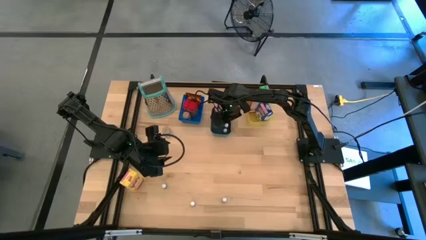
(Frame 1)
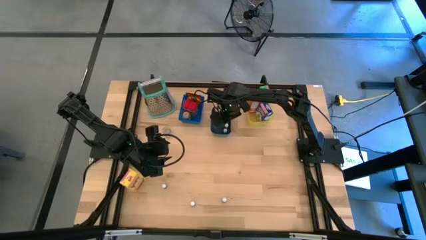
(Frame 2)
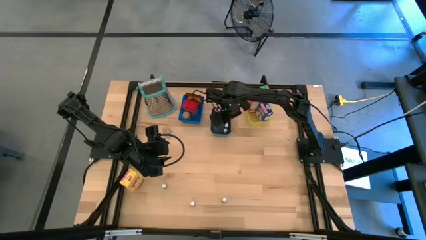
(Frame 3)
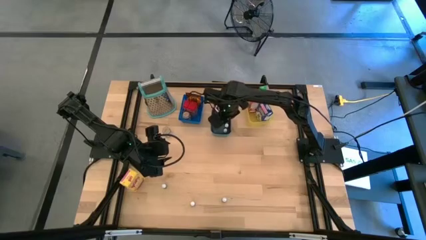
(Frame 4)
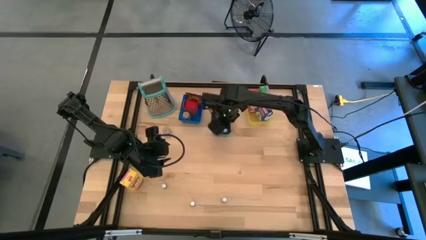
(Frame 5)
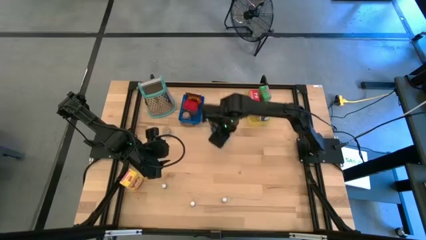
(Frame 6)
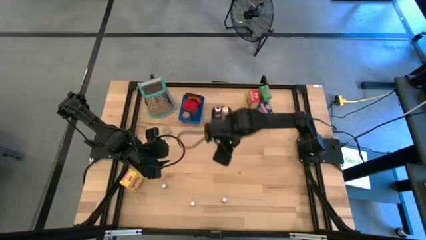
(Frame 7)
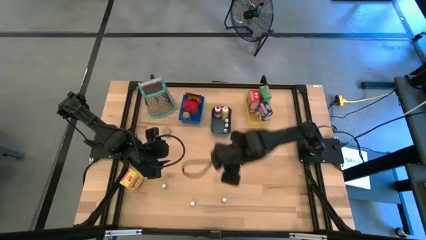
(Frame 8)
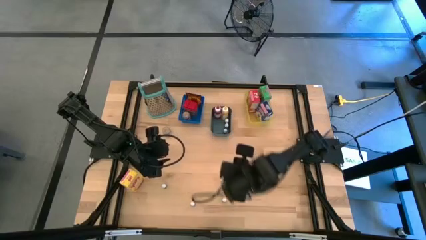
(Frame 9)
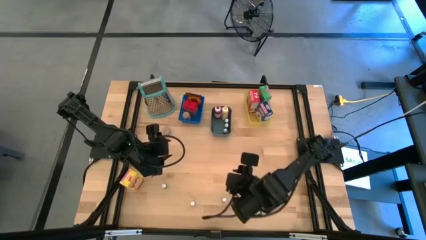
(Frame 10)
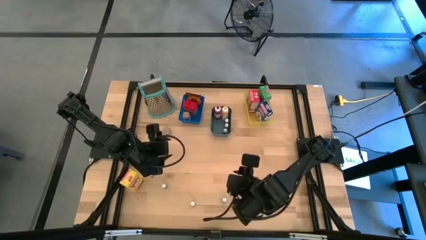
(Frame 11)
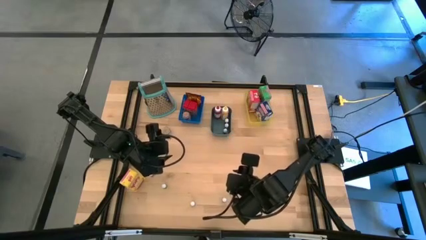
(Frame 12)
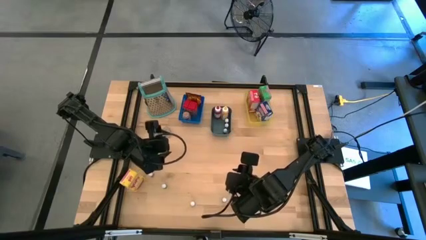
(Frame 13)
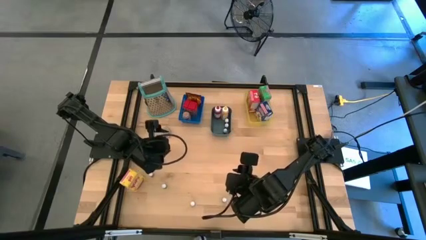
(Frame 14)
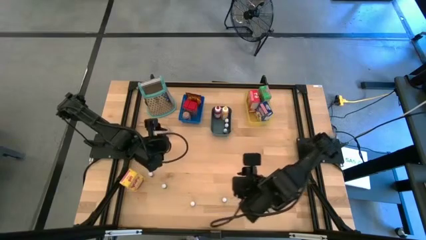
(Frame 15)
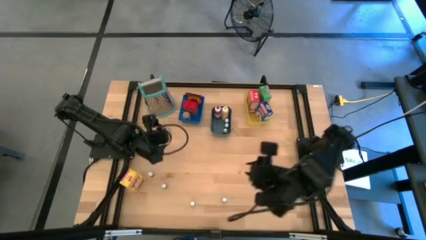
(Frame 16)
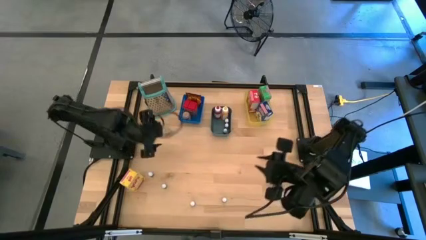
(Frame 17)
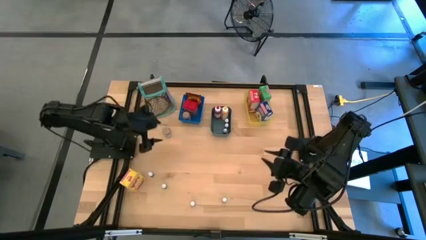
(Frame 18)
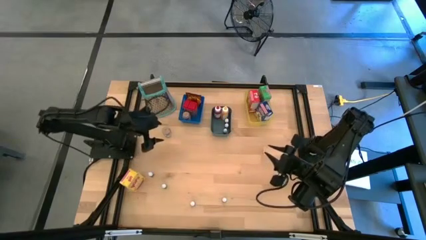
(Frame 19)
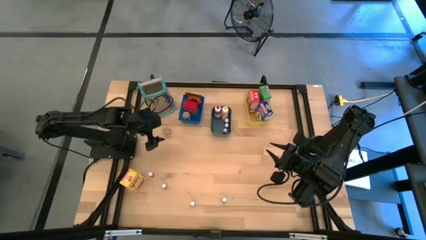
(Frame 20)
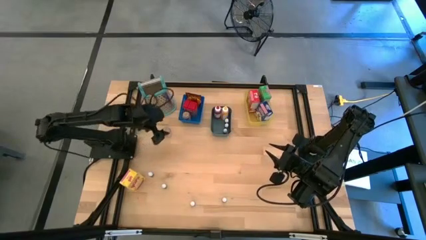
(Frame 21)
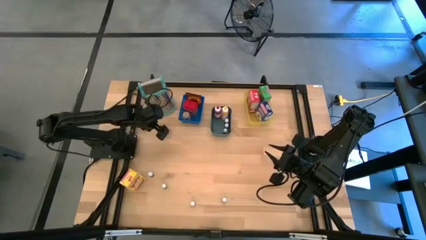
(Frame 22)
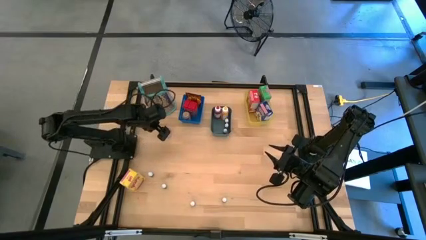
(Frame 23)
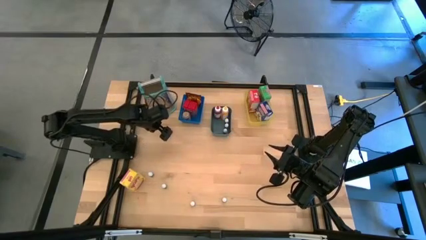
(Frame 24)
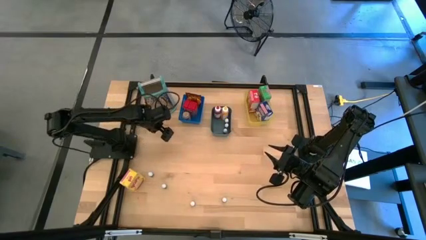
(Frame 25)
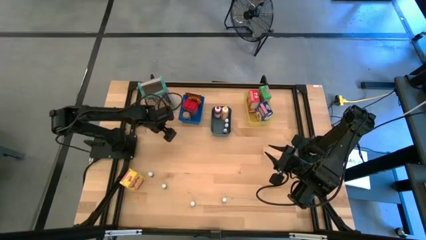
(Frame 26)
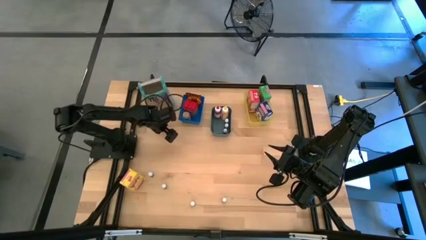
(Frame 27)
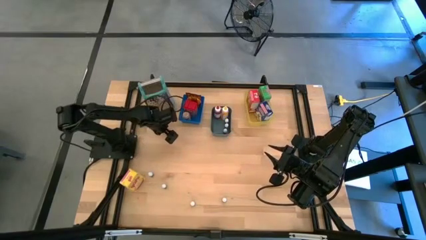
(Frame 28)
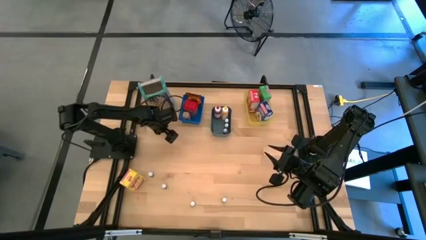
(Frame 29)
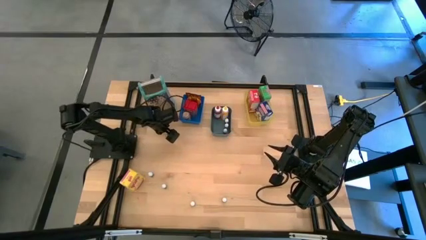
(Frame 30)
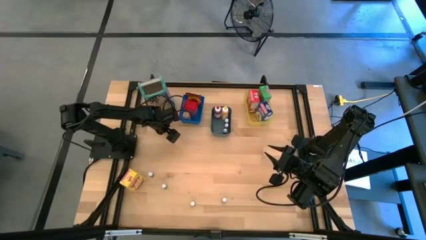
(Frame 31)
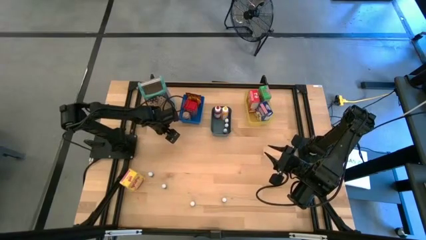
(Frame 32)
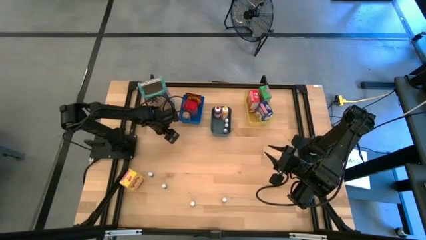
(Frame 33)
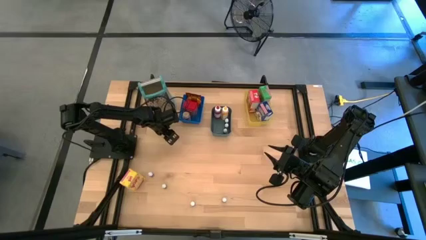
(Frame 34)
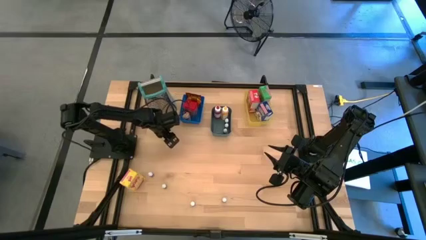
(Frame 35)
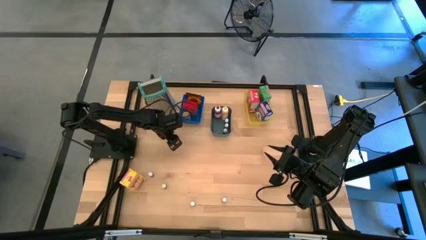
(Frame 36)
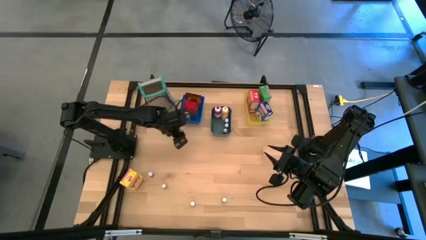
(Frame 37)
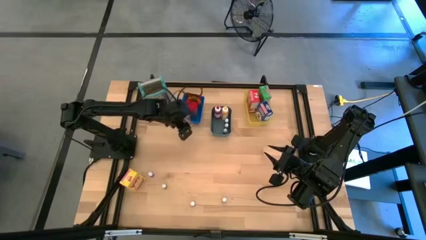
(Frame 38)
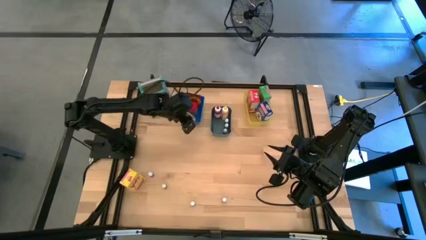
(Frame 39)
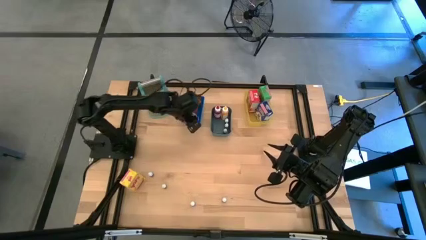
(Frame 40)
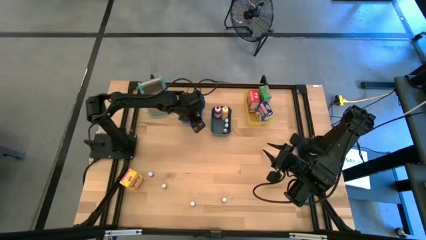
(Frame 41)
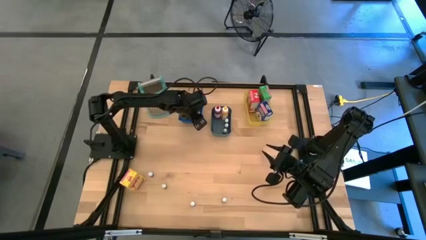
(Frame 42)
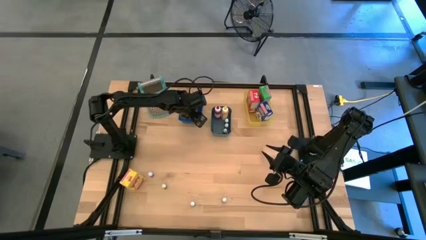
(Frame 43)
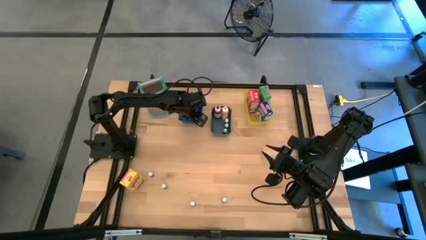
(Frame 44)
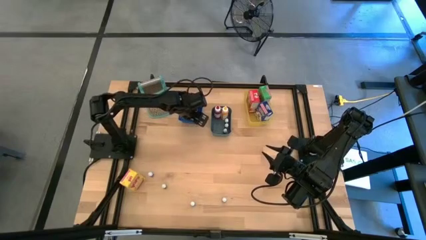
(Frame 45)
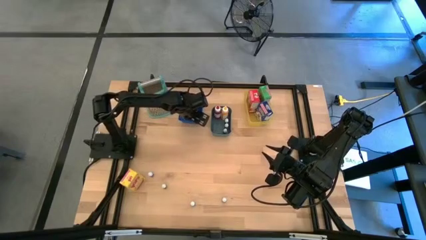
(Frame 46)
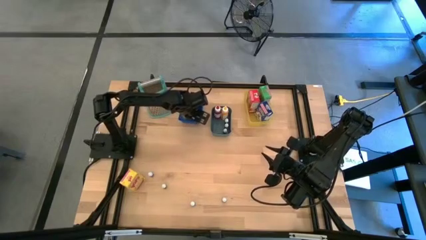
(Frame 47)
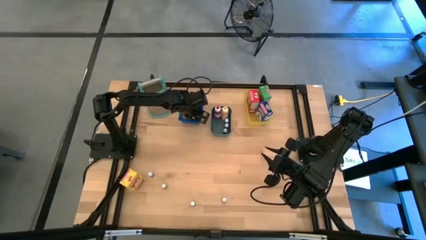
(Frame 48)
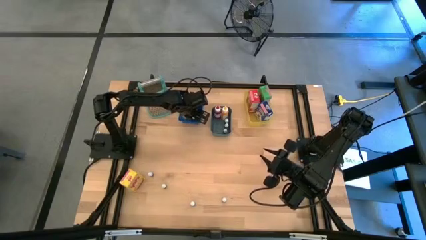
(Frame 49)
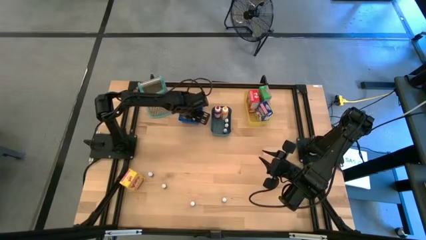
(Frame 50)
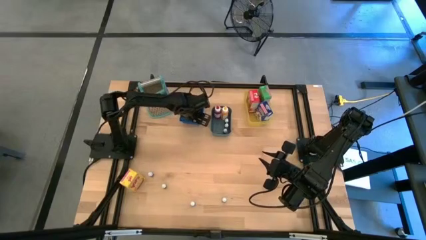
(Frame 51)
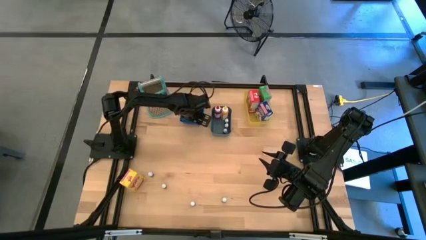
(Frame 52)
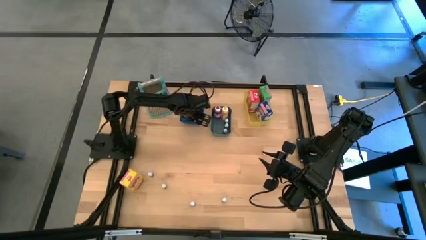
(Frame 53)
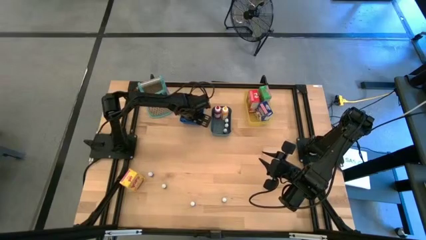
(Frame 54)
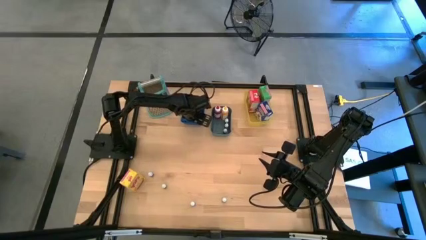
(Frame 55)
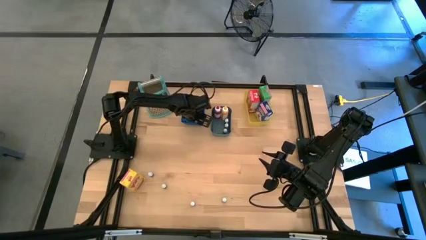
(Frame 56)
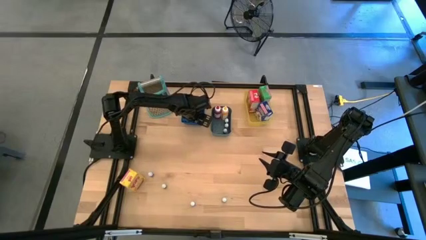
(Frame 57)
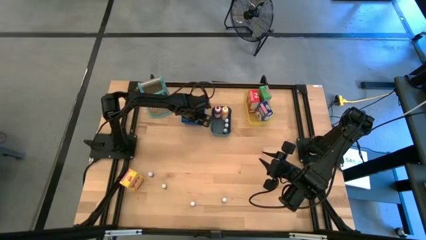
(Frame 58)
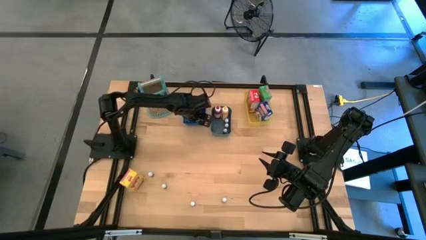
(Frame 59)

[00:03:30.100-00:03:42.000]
Task: Pick & Place Kitchen Items
Put the brown seasoning bottle into the blue bin

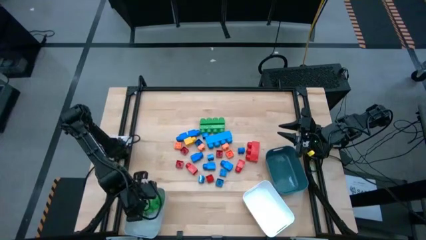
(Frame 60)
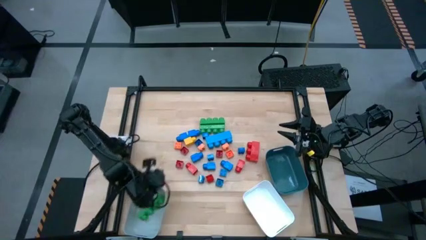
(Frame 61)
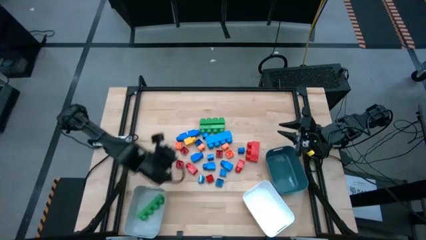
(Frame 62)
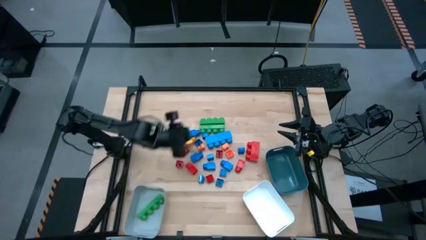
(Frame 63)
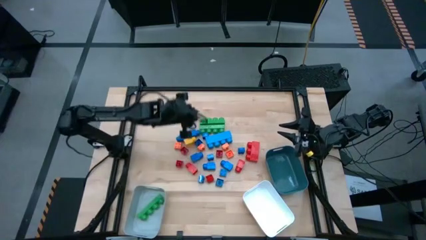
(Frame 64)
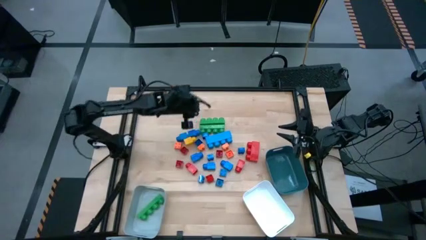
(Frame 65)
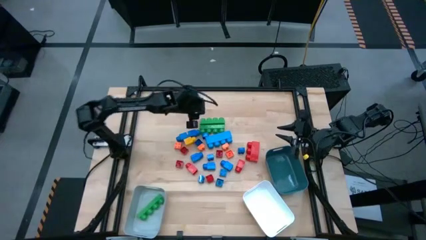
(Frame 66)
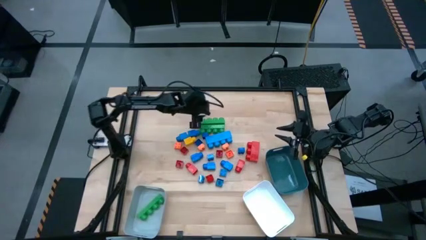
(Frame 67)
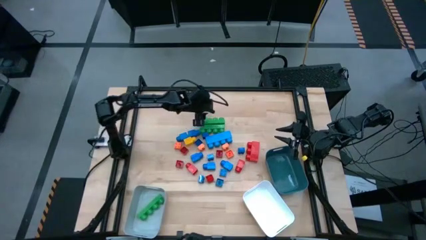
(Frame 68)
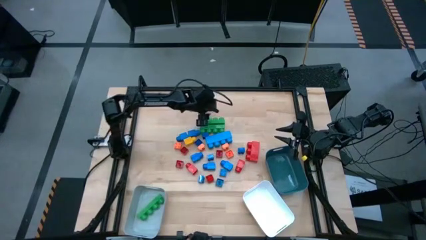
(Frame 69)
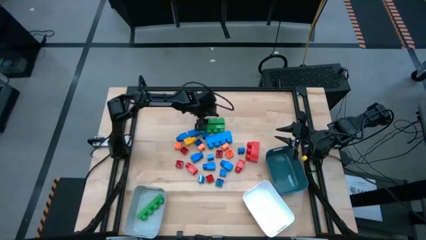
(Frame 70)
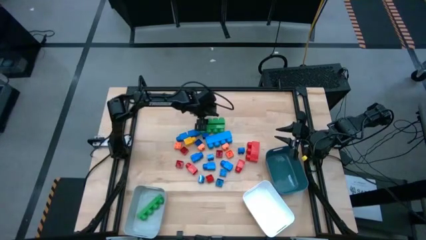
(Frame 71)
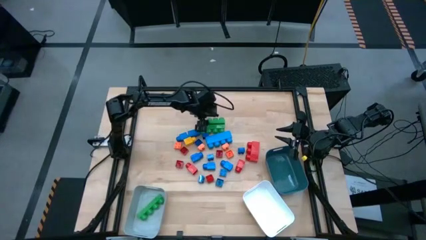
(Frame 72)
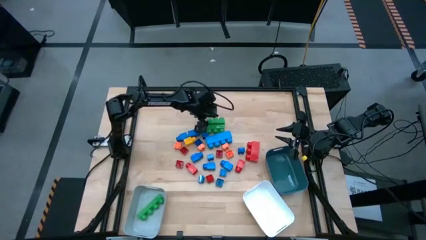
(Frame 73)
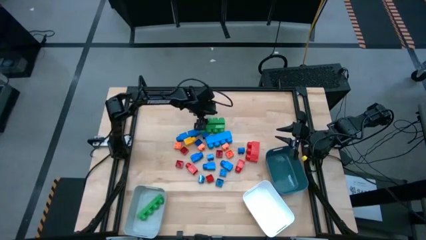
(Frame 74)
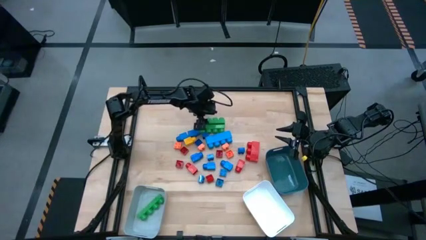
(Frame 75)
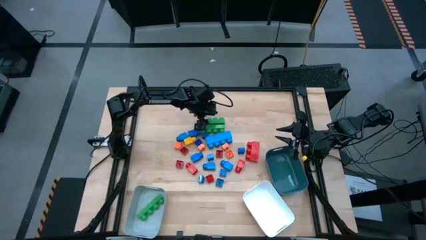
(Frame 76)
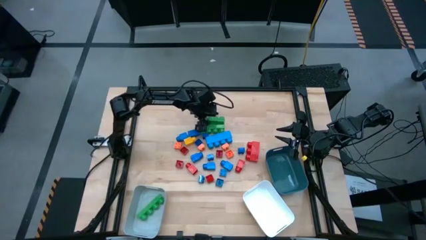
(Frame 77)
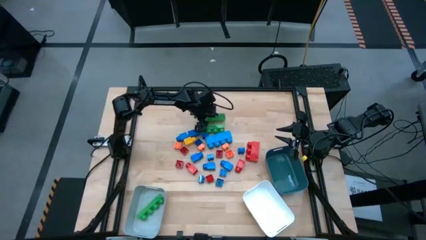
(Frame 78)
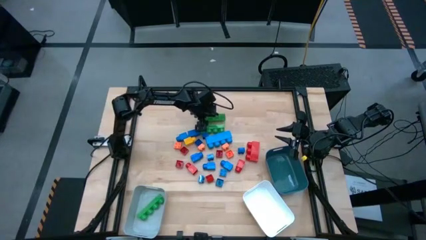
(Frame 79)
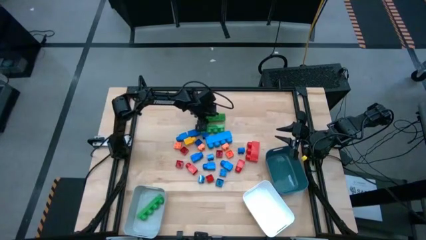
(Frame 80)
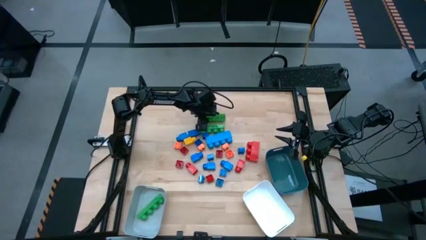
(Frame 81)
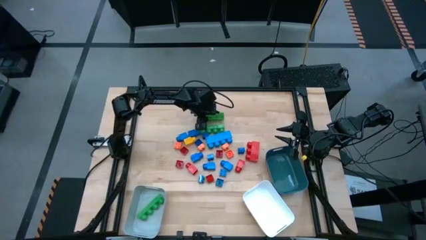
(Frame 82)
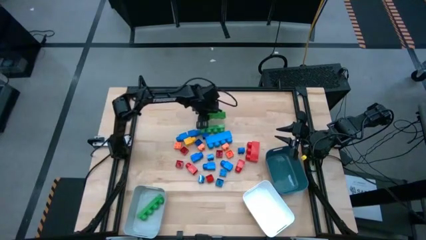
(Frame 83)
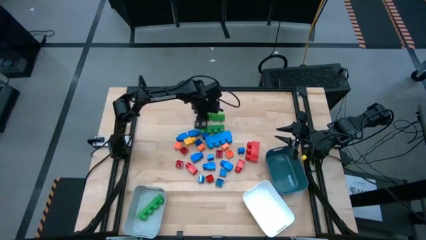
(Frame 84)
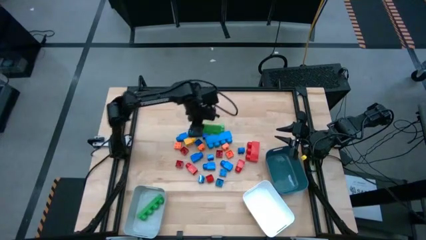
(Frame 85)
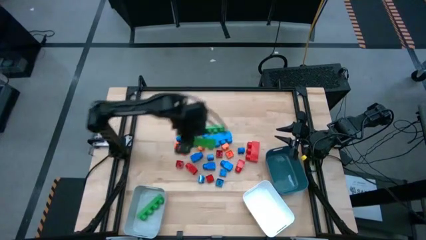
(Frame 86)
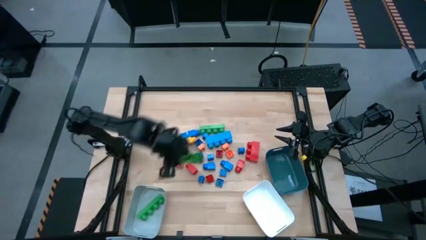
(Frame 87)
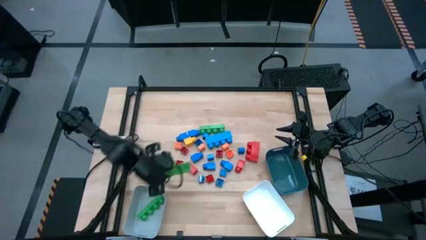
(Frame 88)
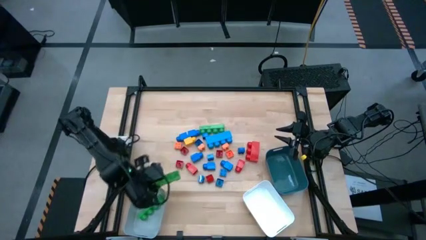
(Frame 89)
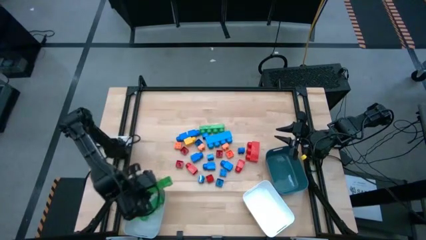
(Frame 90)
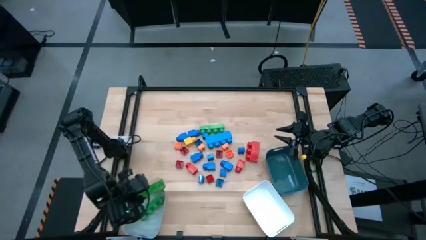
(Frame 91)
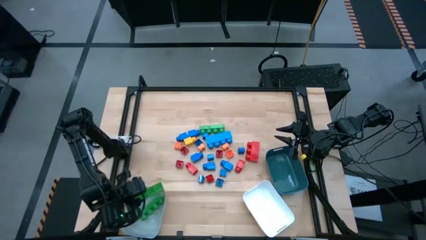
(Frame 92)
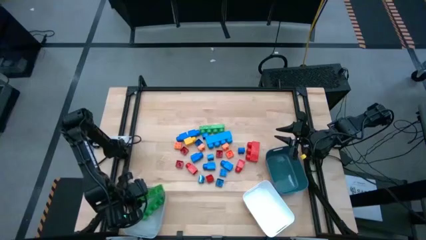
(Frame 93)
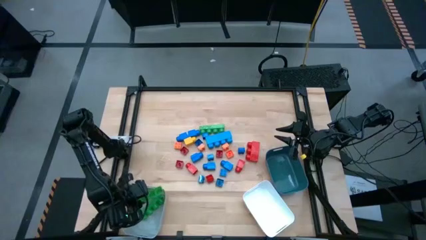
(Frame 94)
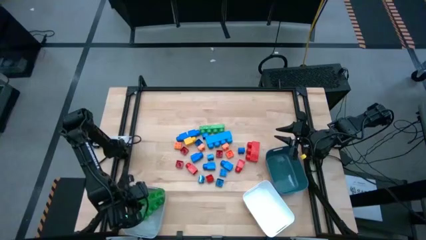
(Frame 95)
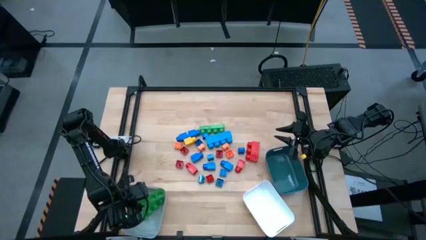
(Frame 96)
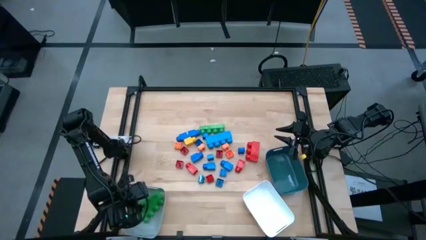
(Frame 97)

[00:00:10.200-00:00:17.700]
Task: Sort blocks by size
Put the rectangular green game piece into the gray bin
